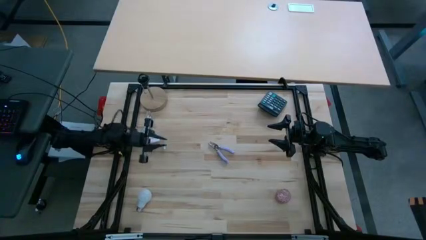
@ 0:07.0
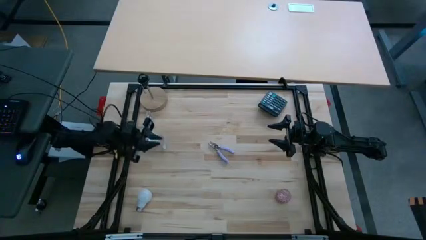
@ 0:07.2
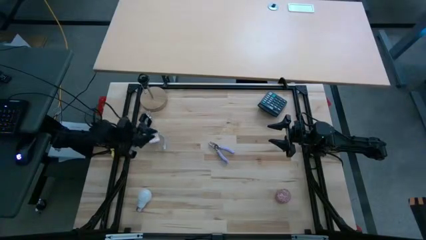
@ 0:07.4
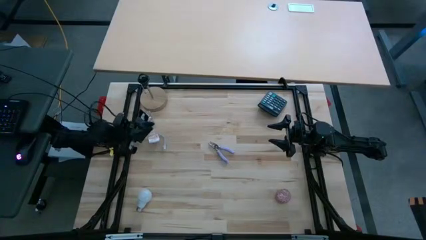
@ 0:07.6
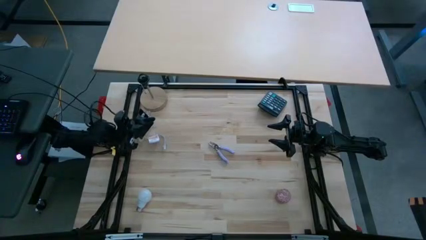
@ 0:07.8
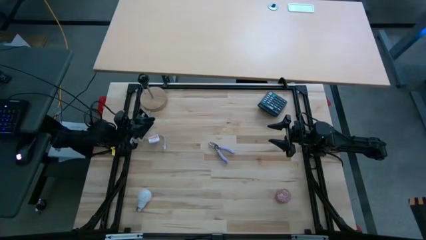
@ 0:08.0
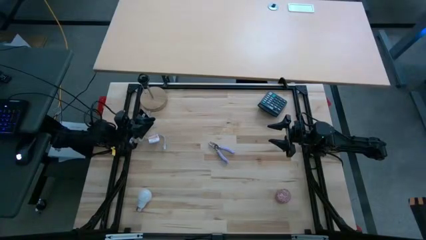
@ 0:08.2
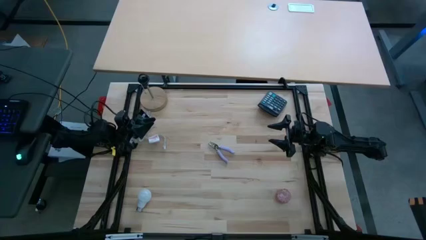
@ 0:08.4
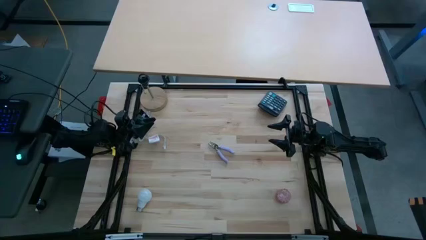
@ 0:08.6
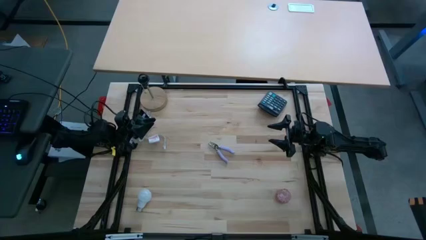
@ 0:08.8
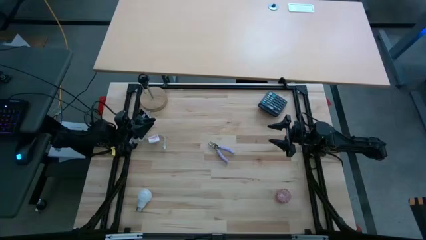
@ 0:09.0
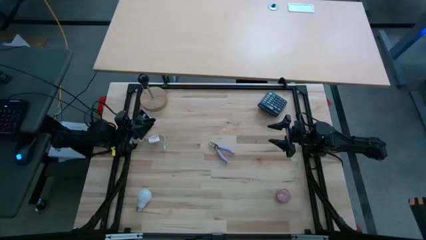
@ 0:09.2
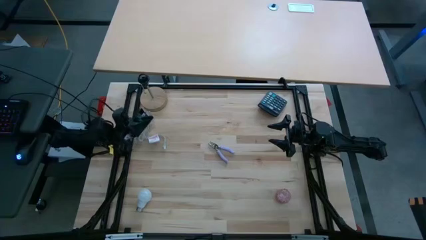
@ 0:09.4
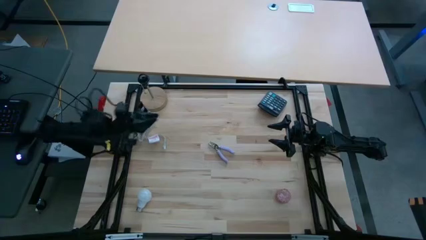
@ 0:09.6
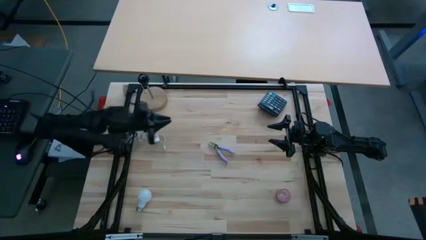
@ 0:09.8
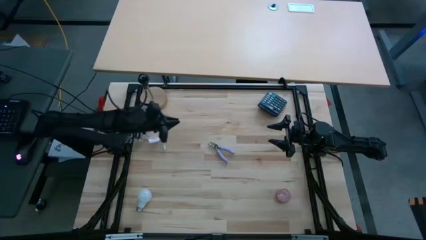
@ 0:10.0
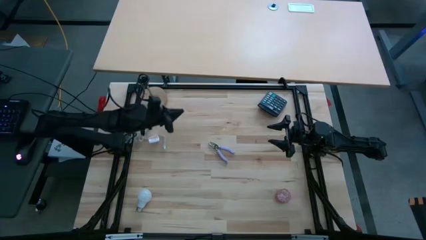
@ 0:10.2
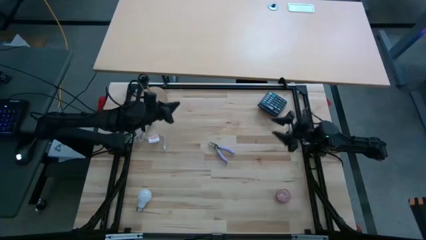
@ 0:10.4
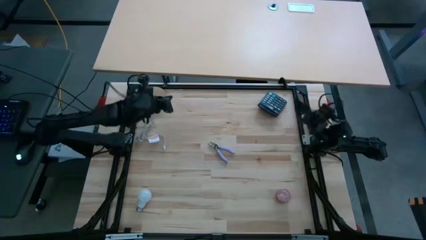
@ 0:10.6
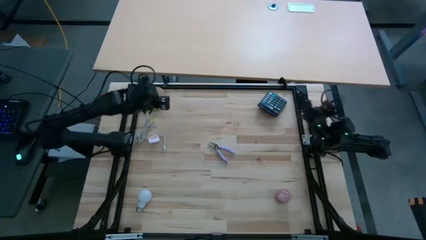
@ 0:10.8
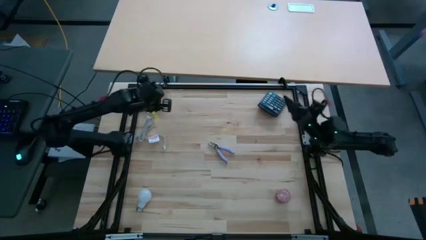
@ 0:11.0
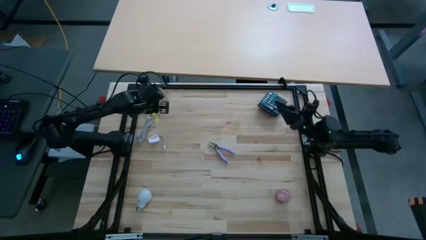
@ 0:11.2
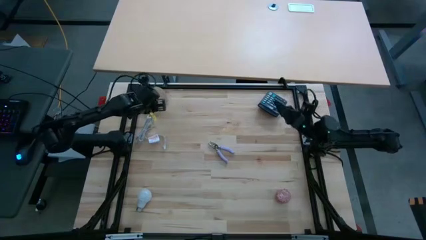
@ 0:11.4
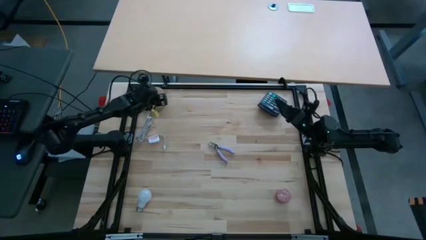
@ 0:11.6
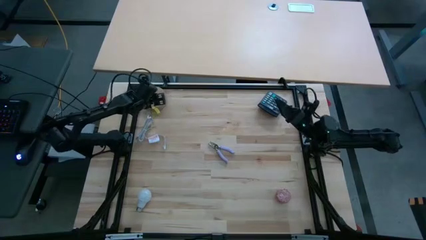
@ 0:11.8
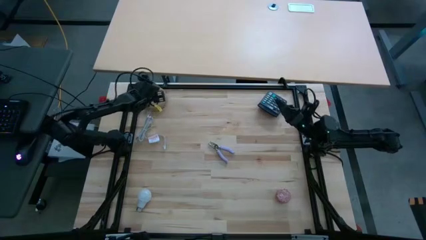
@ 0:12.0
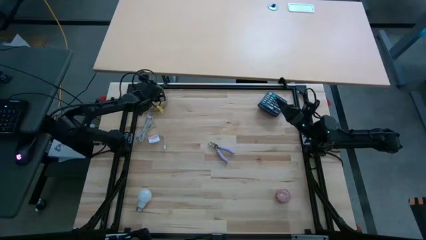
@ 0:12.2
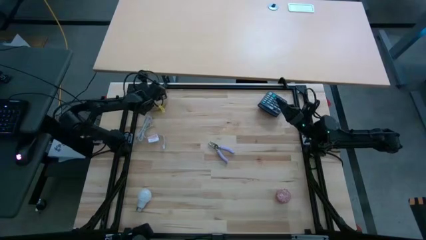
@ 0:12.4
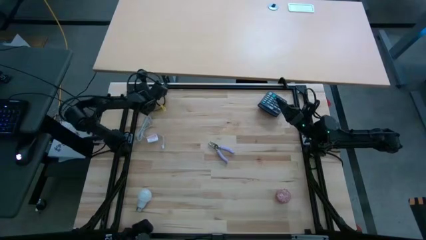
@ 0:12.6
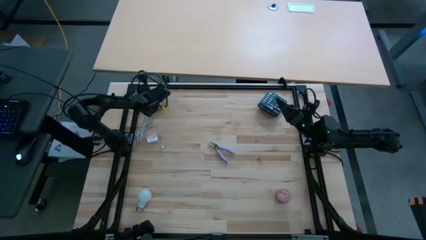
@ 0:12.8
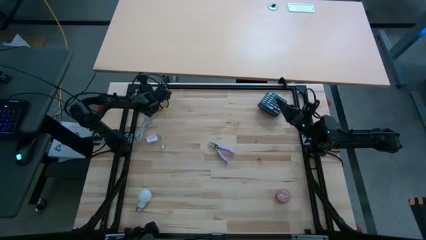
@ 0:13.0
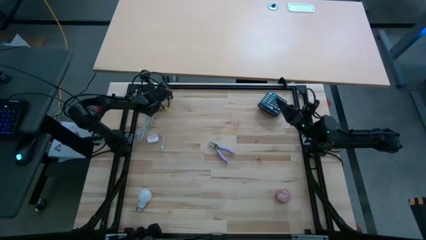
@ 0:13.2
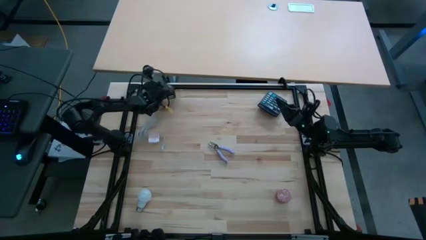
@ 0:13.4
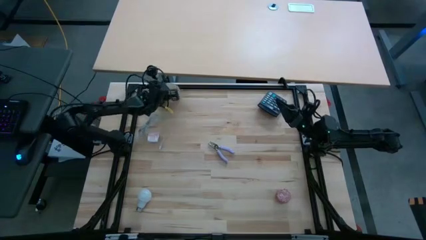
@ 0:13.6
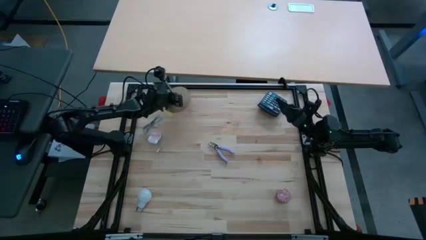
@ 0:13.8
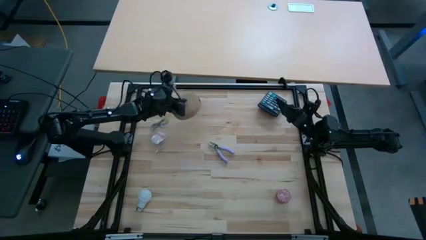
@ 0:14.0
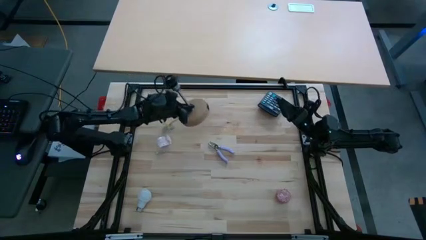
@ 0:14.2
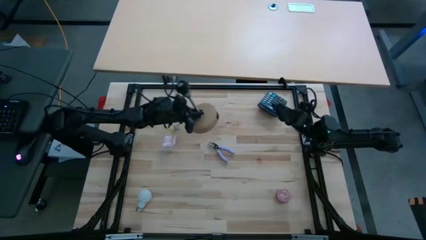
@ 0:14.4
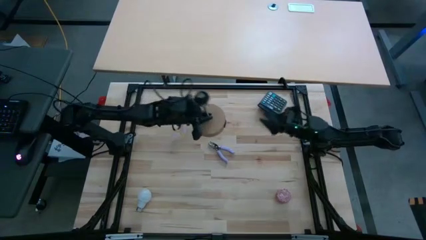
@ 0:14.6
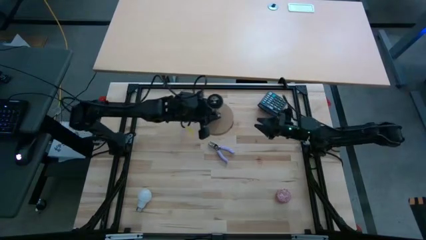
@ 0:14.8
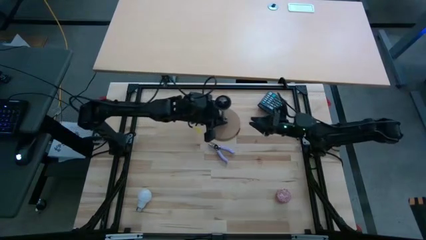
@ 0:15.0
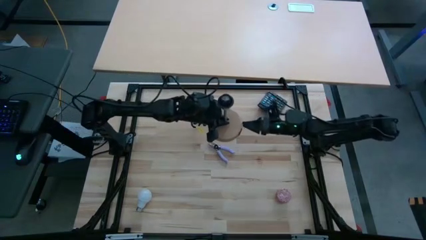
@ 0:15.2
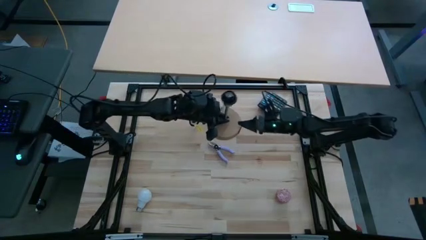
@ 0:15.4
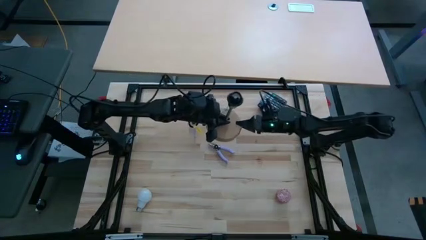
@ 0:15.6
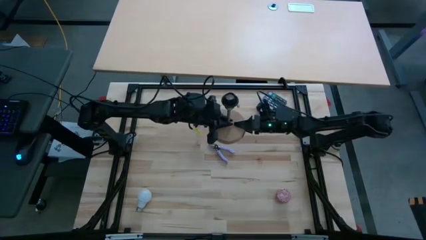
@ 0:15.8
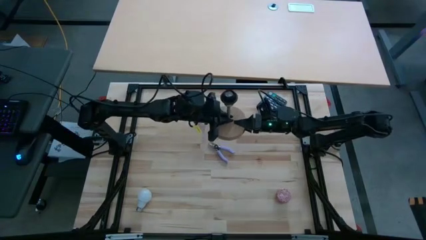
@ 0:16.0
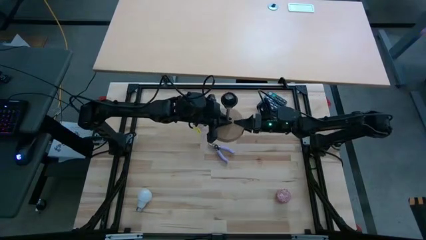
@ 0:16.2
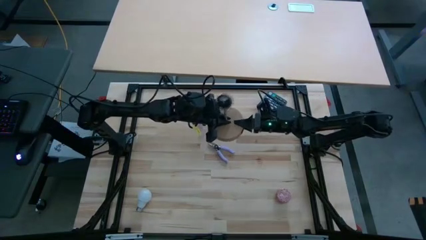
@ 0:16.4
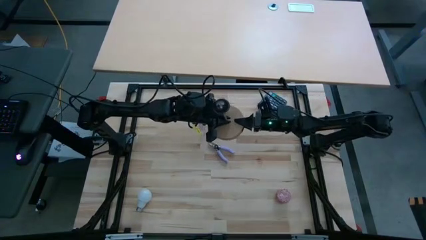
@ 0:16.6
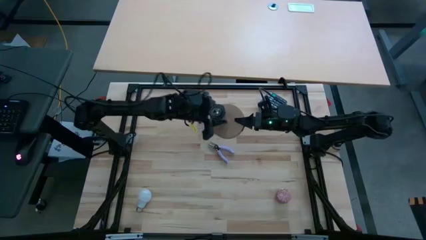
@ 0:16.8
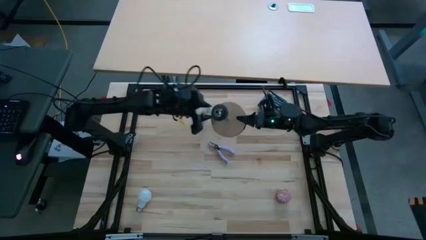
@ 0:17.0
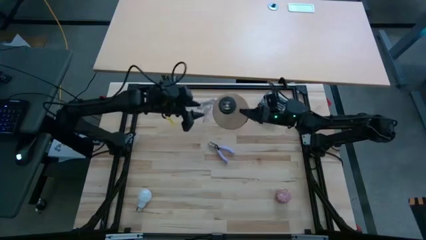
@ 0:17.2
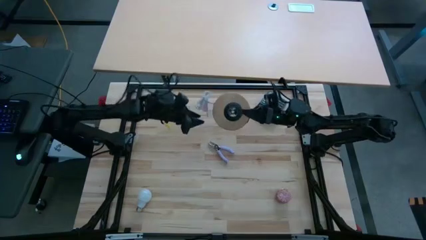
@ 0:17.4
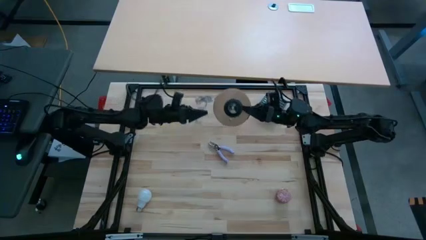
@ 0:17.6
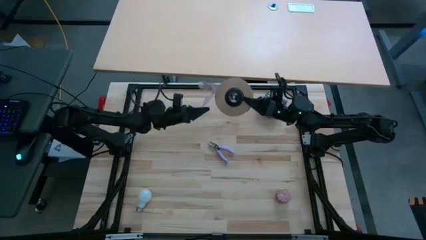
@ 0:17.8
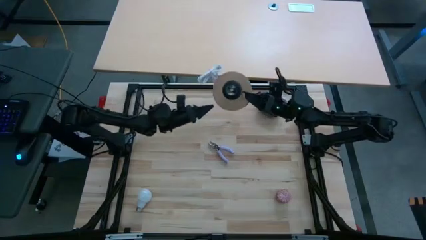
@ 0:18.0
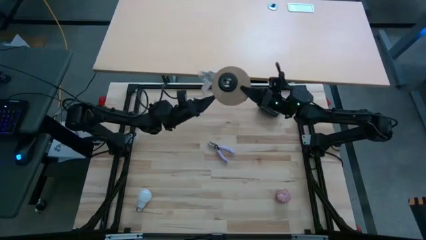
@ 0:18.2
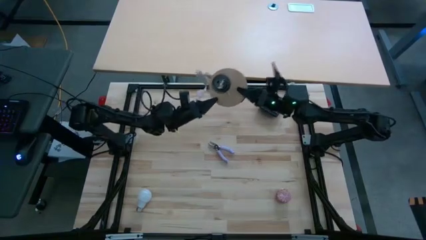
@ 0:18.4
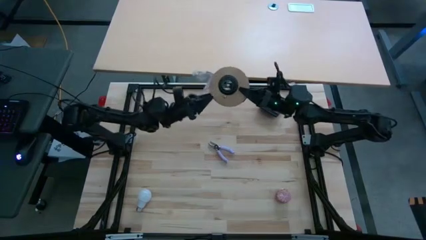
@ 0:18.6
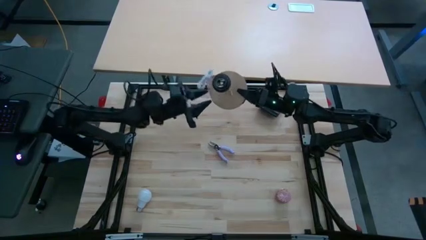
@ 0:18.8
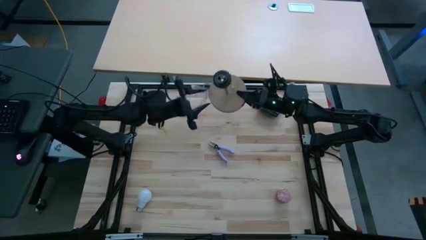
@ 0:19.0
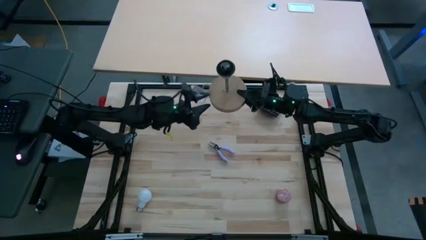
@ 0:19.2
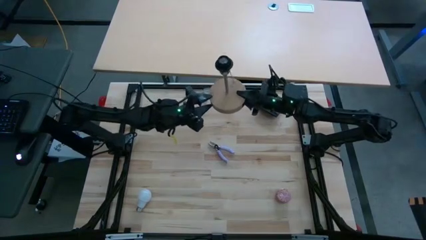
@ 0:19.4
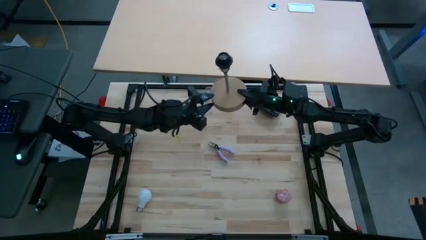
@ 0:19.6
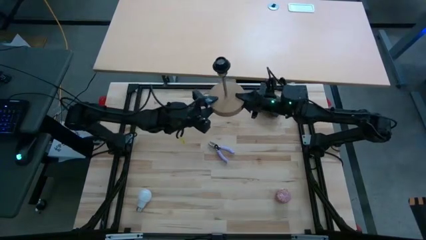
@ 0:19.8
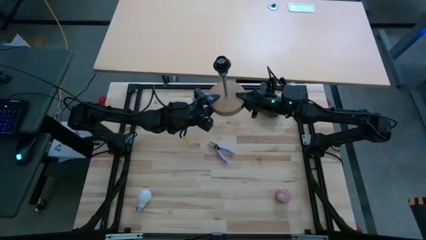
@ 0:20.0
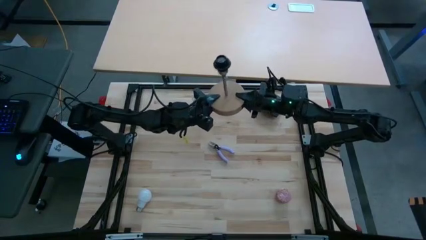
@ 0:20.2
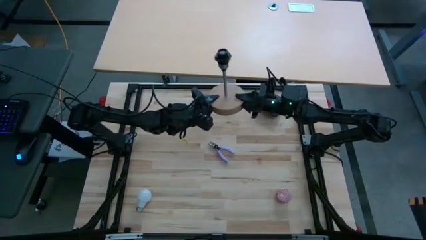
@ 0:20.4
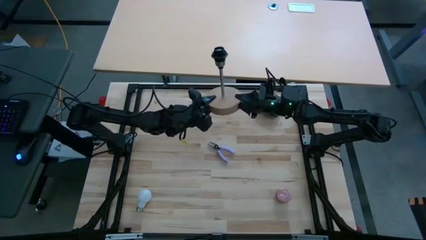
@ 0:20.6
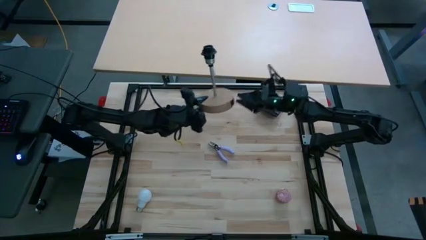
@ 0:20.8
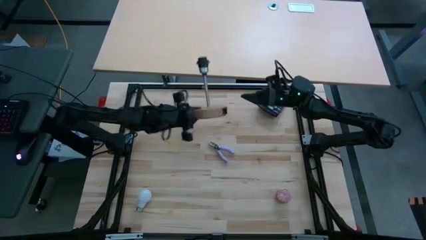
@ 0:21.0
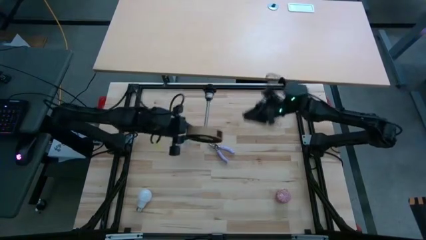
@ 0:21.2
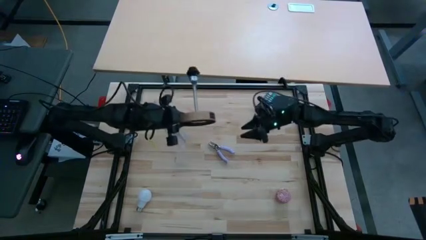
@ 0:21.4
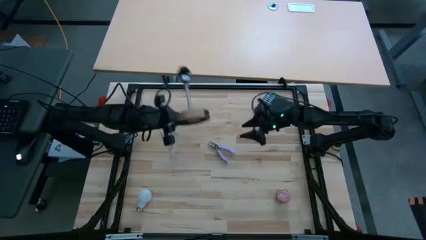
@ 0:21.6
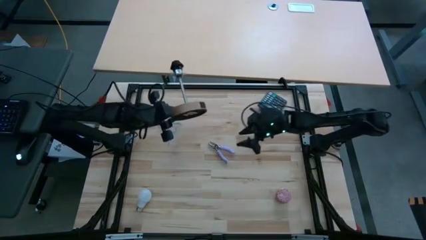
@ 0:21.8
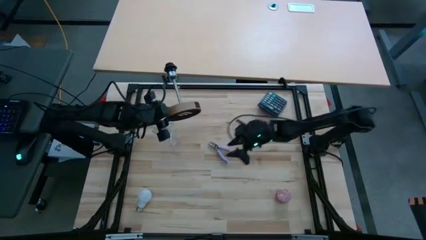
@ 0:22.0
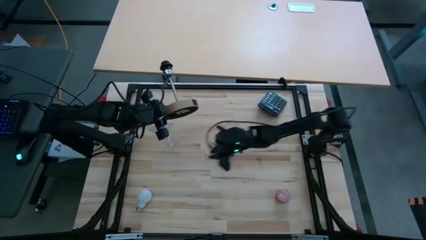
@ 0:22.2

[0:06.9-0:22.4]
Task: Screw lightbulb
Insert the light bulb into the lamp socket

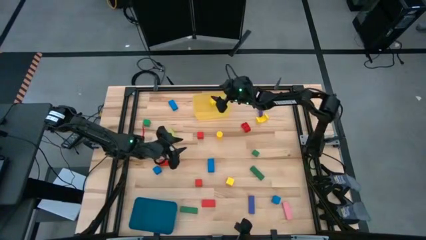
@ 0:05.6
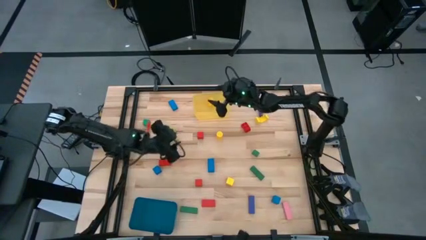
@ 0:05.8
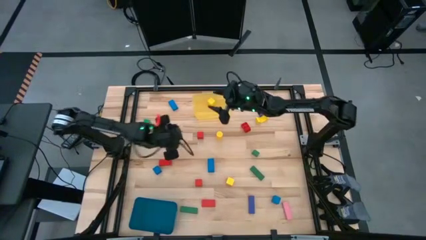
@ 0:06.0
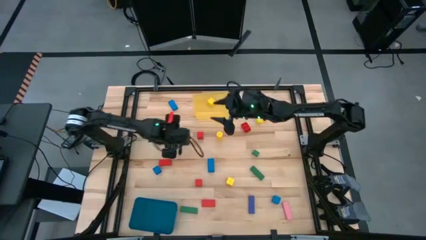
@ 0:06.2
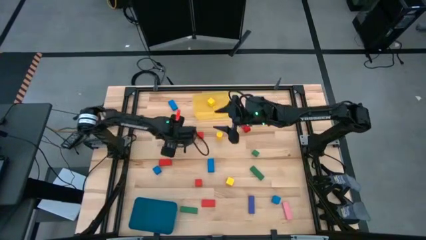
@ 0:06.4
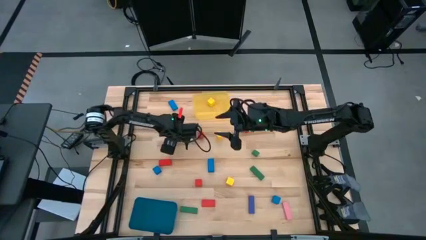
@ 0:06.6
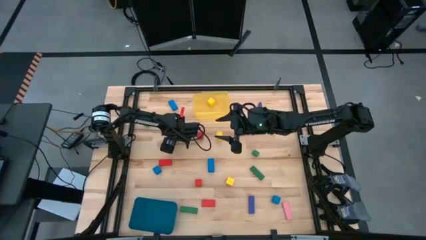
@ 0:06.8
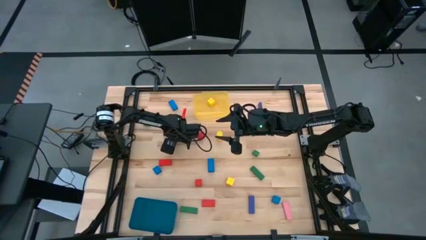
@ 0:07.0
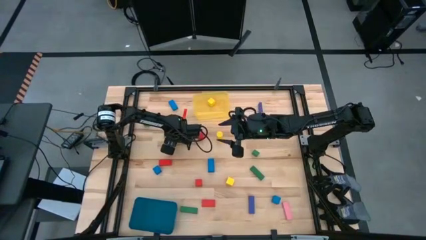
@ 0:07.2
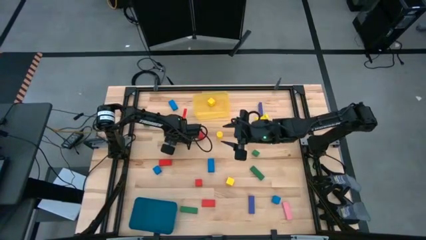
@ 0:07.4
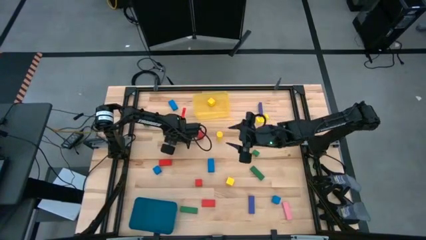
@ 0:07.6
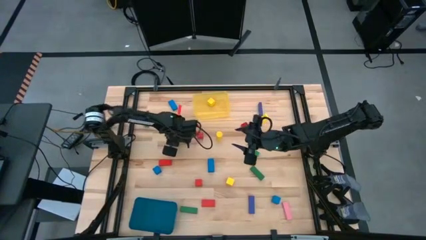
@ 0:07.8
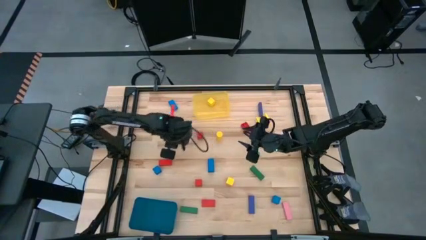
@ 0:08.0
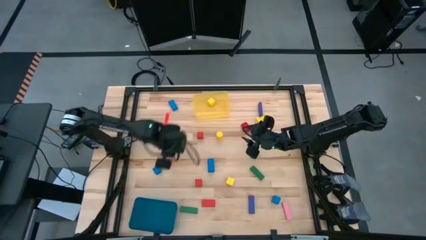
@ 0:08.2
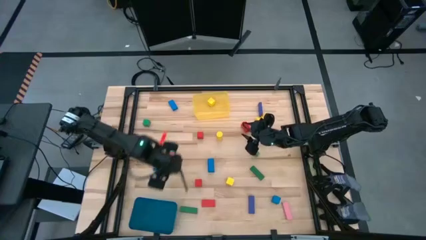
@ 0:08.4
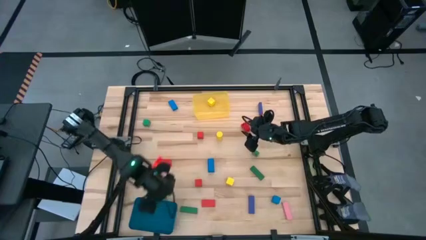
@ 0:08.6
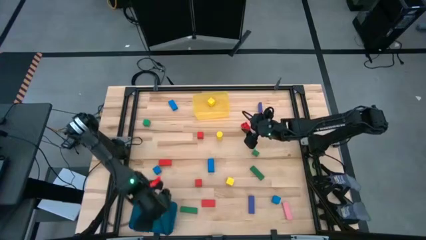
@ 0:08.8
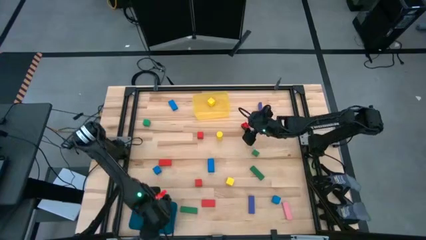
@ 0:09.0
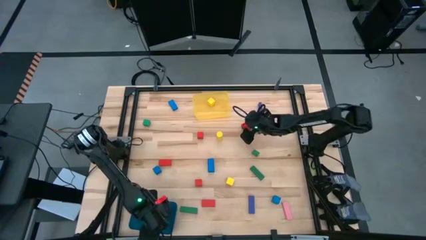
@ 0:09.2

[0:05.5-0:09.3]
Task: Sort blocks by size
Put the light green rectangular block into the blue bin
